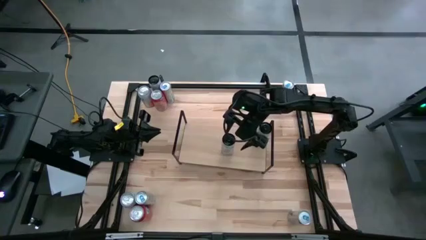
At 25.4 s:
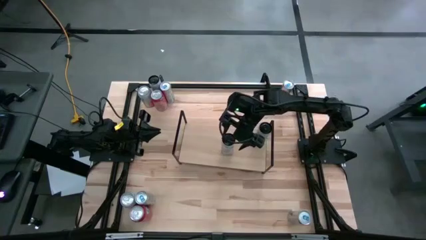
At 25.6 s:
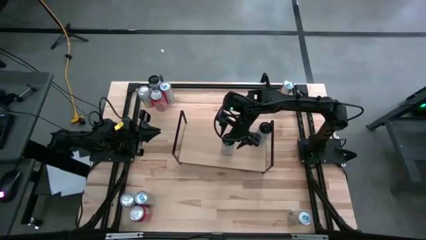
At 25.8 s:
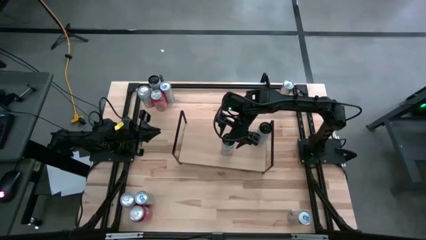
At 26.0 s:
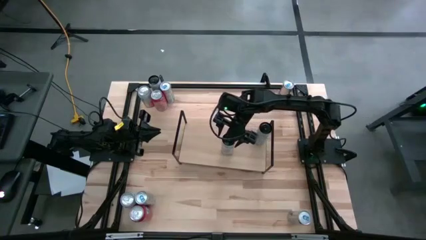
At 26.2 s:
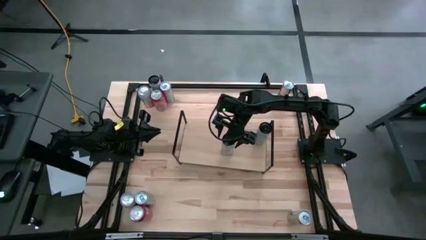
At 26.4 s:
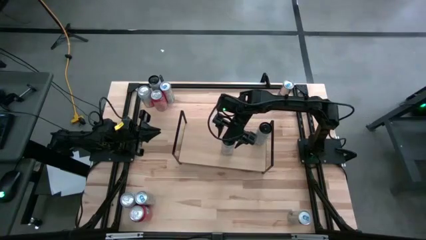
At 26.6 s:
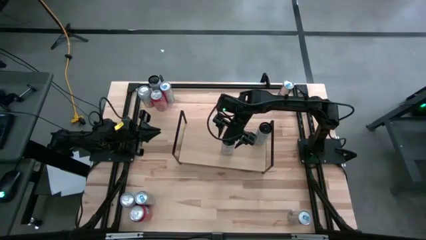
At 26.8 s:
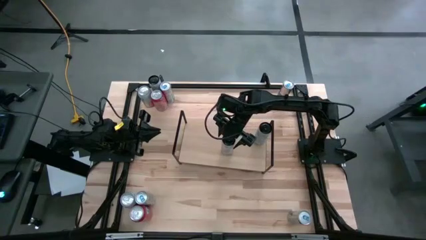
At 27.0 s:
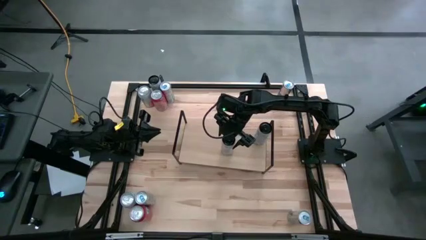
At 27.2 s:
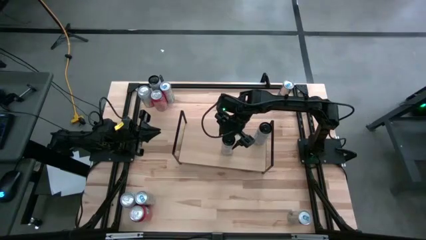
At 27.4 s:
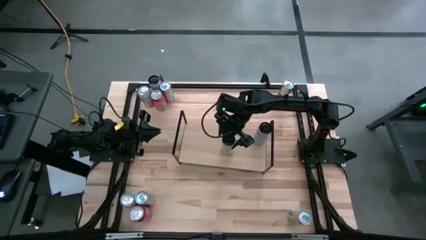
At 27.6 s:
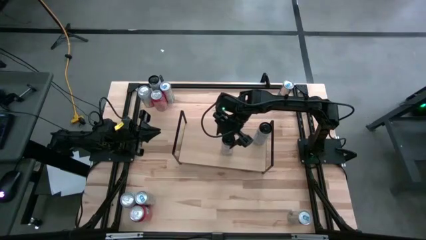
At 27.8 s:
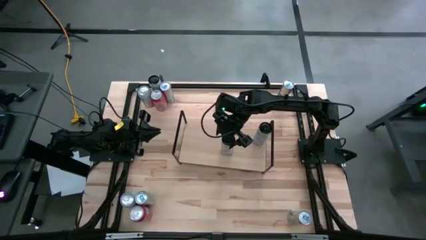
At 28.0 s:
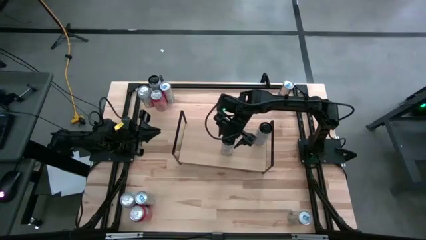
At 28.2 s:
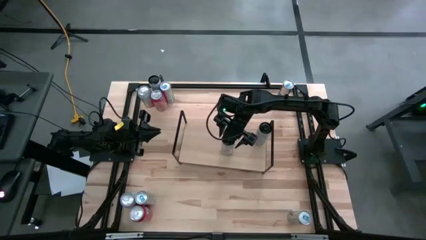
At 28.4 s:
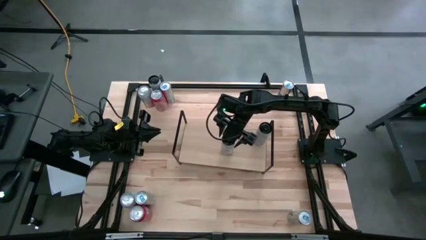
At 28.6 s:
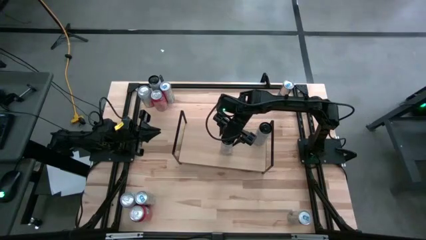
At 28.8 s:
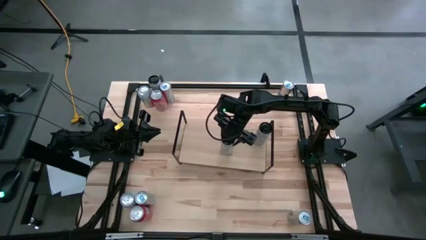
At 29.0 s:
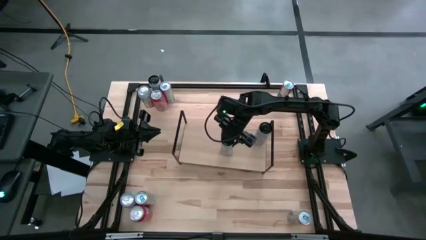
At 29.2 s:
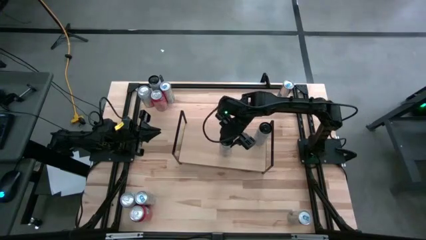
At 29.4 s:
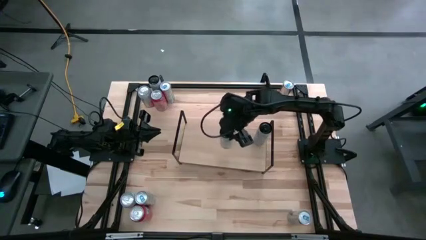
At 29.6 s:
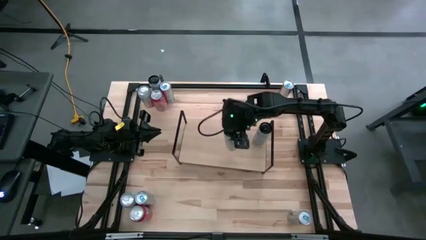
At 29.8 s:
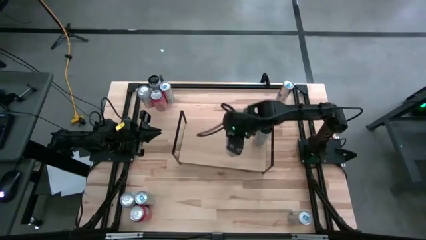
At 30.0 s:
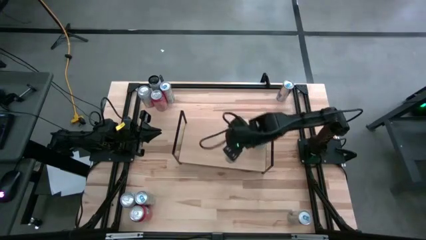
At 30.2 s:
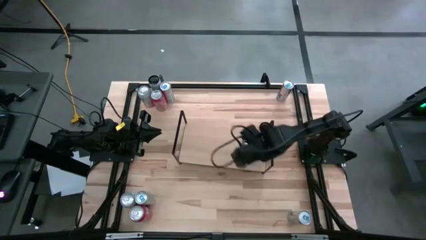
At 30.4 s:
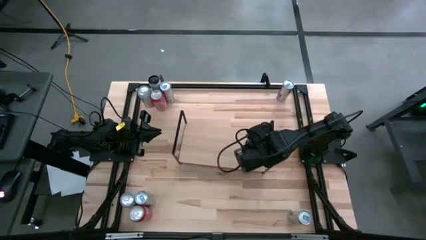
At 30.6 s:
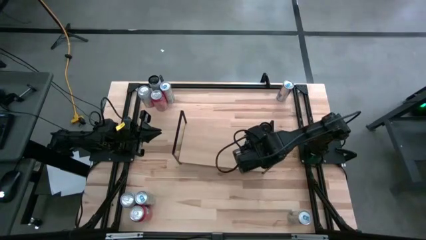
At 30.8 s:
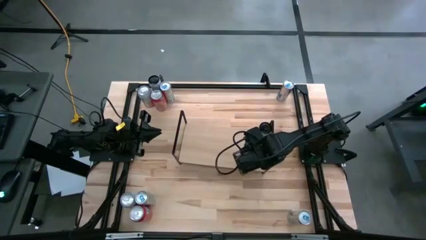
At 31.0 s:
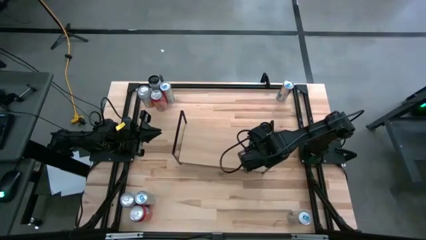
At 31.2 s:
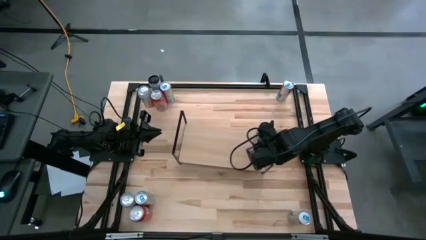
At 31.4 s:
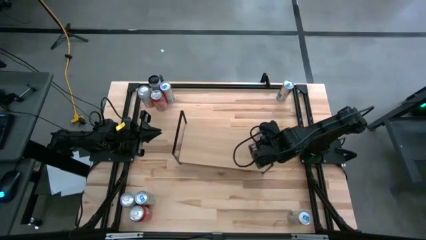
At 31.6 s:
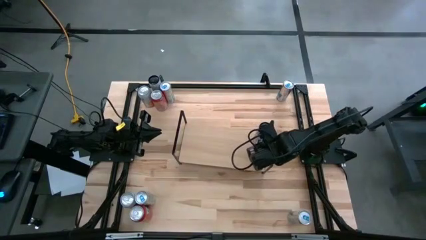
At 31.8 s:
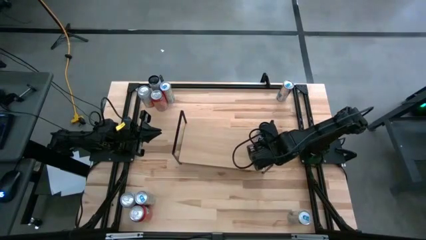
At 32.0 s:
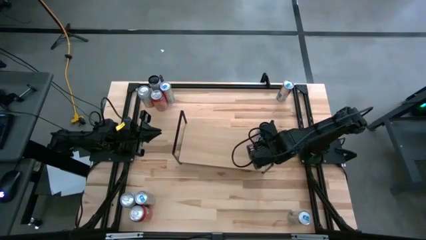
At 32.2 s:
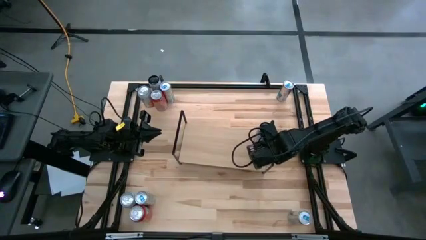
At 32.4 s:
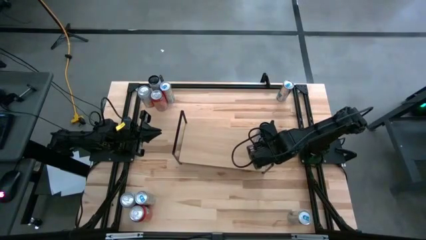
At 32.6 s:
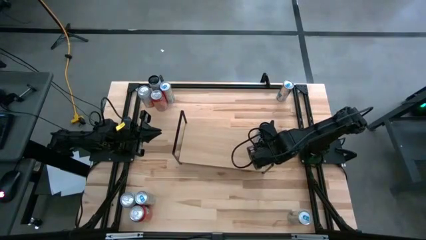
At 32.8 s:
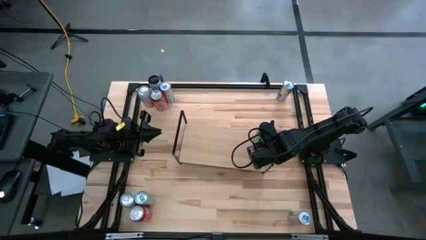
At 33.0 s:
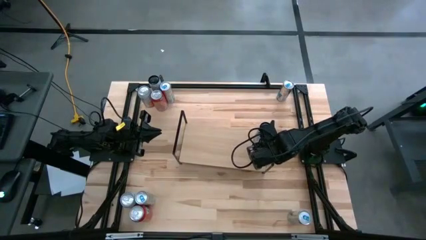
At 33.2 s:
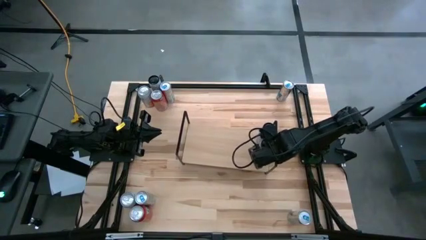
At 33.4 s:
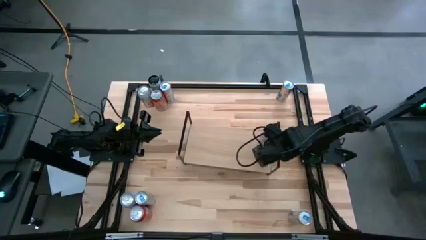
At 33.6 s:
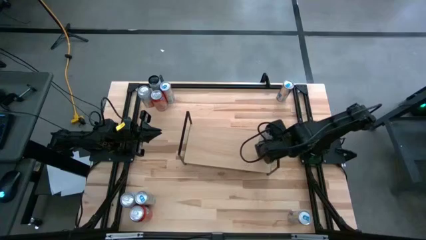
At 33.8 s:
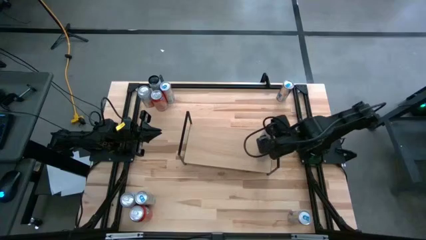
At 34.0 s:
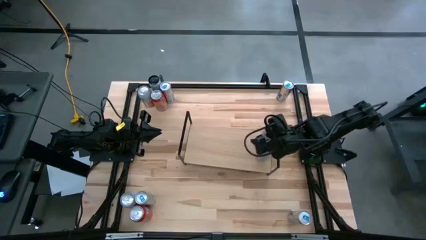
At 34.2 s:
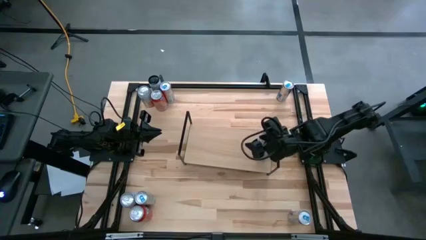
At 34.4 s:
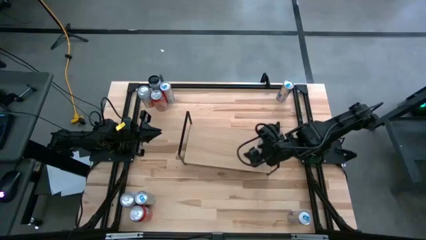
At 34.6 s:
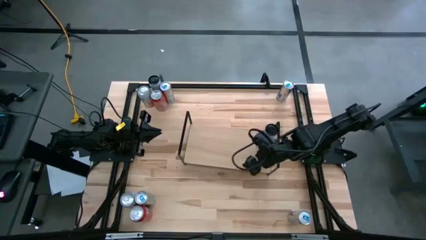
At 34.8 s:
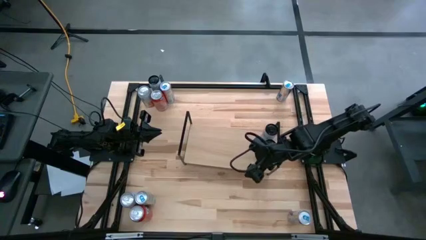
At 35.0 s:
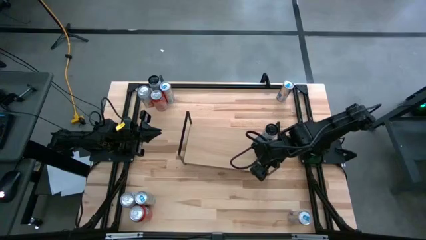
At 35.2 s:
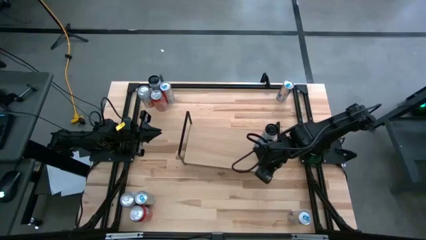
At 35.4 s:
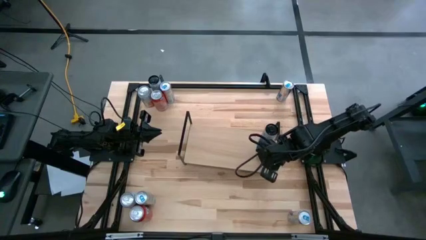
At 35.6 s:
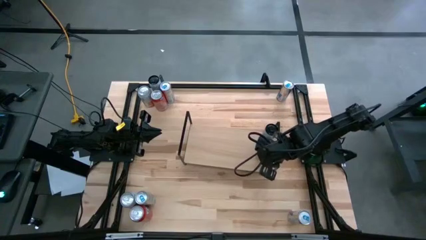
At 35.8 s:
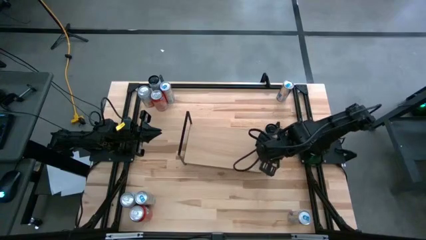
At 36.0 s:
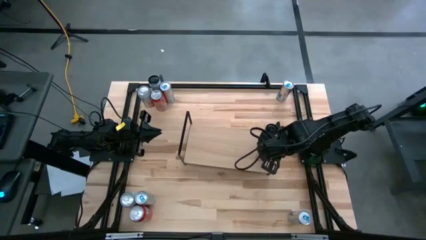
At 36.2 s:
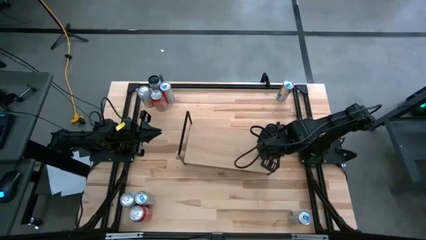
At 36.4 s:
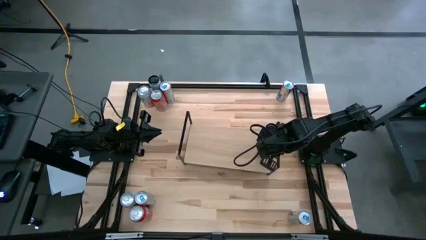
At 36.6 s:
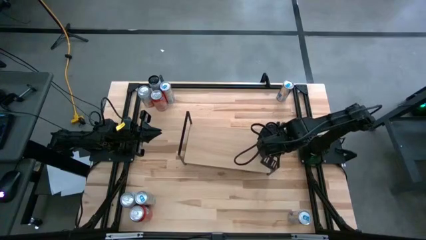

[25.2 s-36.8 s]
Task: Place canned beverage on shelf
Put the white soda can on the shelf aligned with the other white soda can

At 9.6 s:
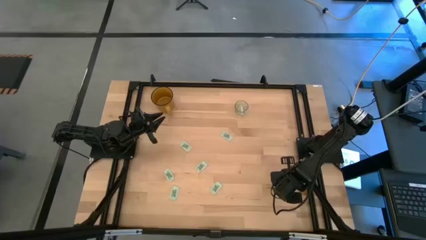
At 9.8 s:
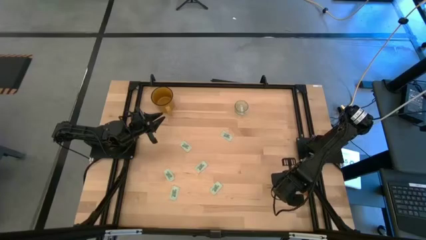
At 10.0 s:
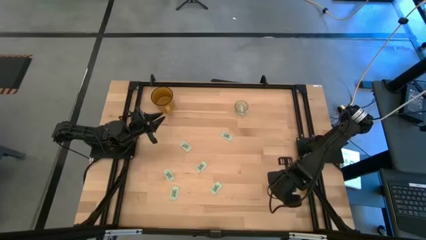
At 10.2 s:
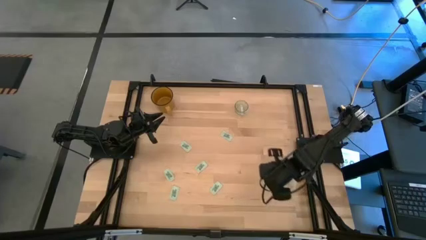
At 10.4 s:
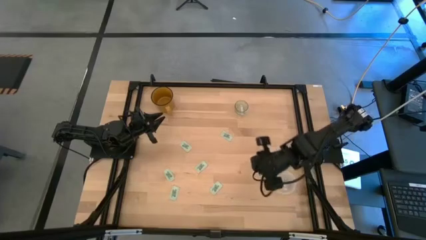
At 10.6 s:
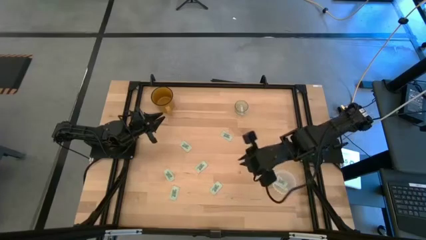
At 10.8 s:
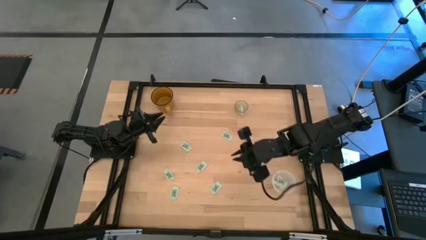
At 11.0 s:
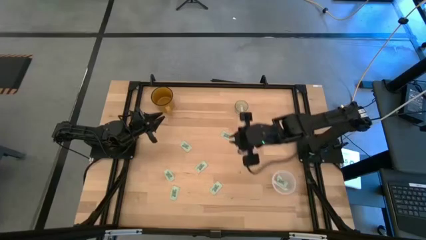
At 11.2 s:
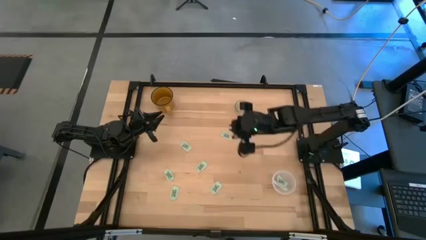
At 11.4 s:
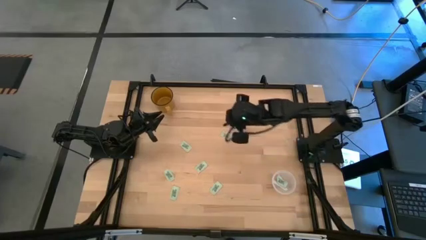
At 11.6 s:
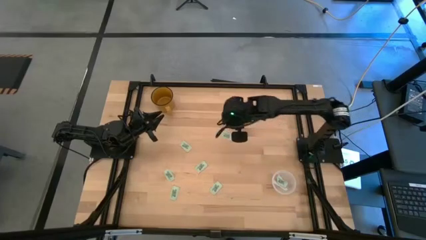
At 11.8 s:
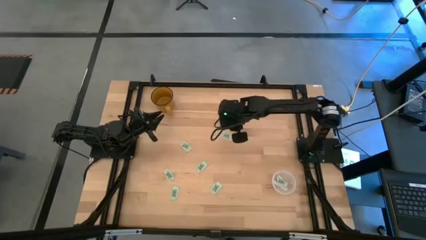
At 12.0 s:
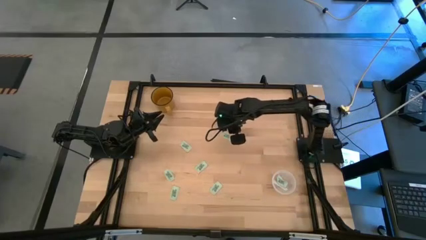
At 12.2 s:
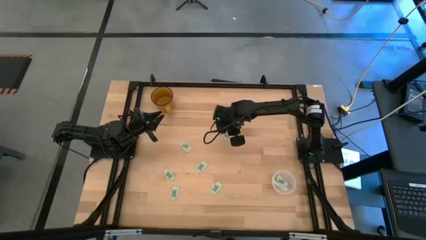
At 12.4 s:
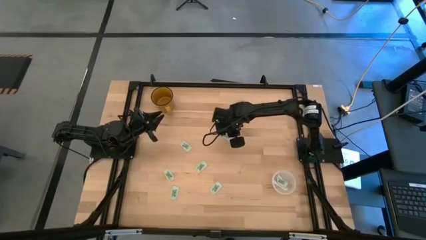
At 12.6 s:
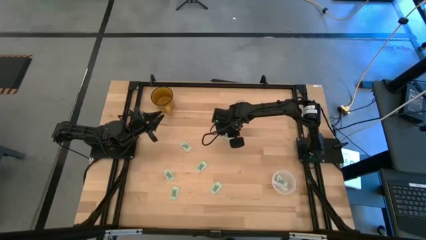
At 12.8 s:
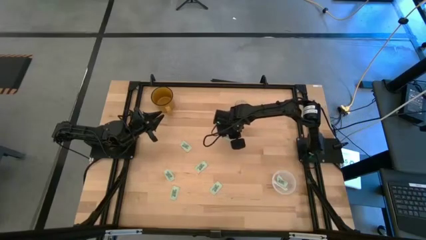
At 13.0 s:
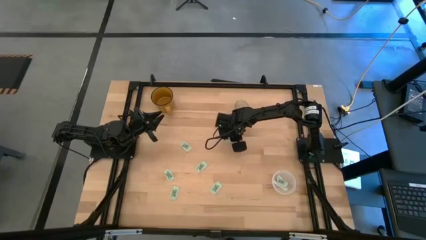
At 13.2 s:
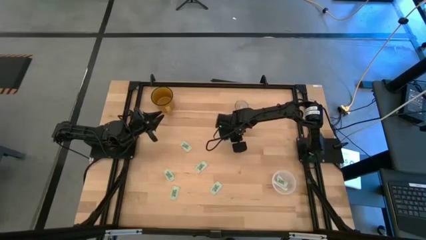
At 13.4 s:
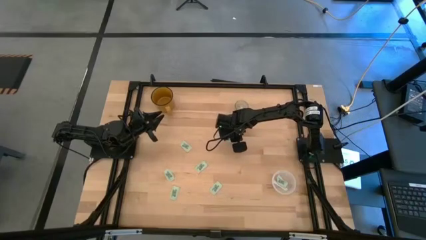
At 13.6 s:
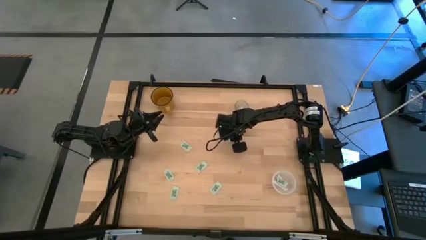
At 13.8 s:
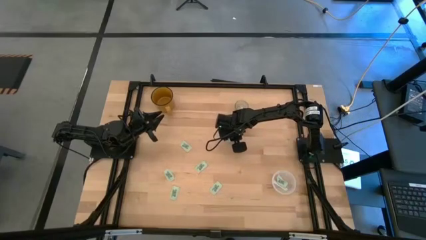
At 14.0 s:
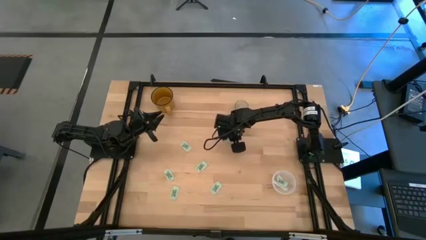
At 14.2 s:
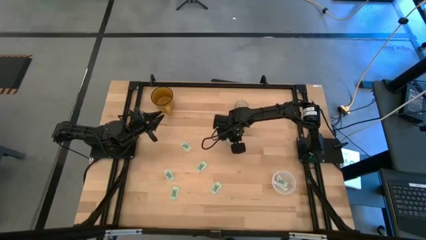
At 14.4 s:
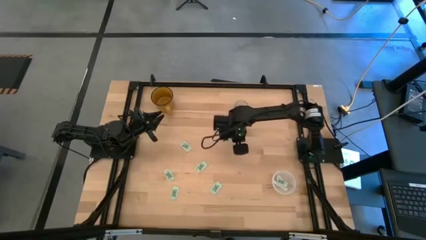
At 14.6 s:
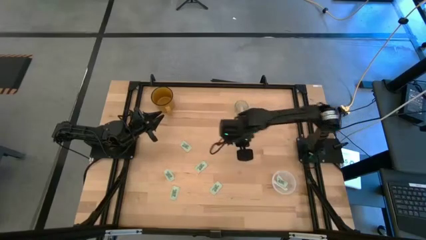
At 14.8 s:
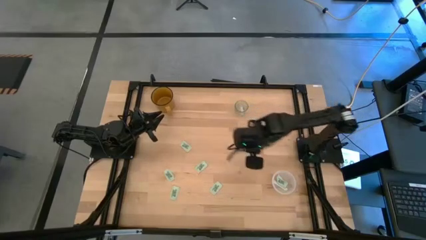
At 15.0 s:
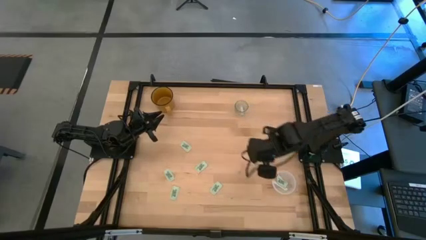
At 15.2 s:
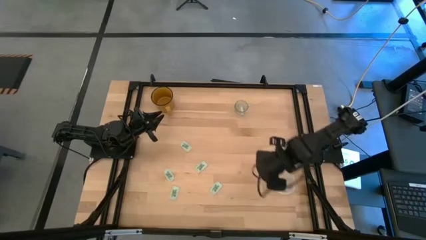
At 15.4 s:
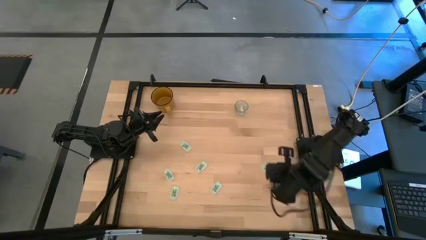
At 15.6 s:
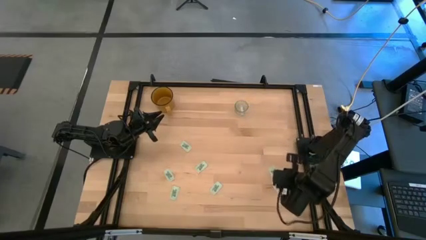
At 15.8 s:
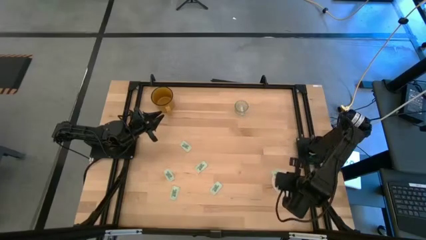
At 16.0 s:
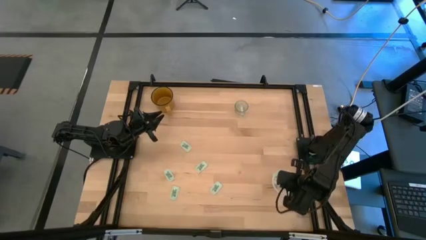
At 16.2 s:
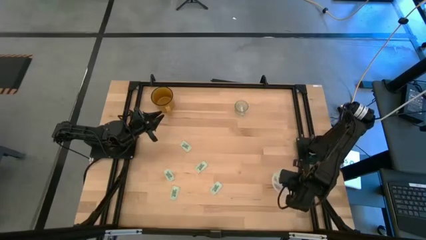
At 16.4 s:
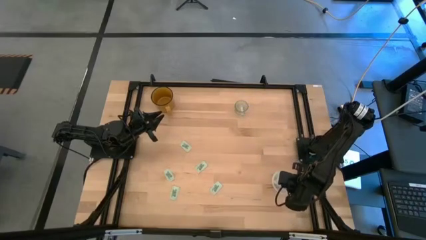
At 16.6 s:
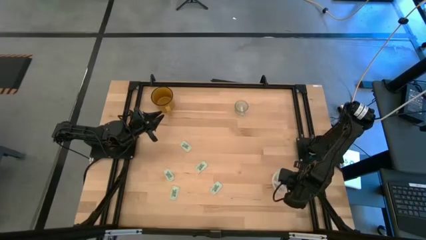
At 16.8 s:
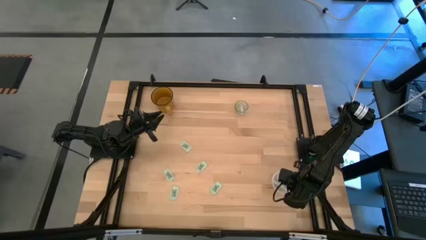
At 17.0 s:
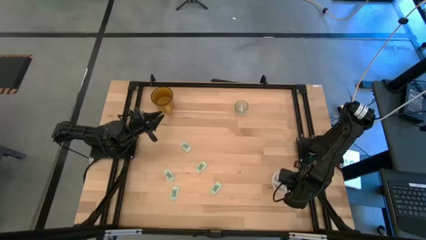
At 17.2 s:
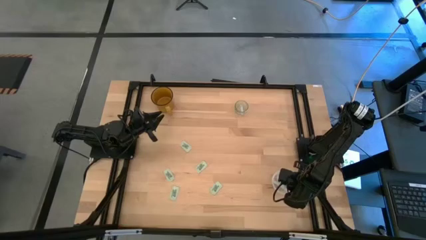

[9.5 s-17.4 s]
Task: Pick and place Stevia / Truvia into bins
Put the stevia packet into the transparent container
